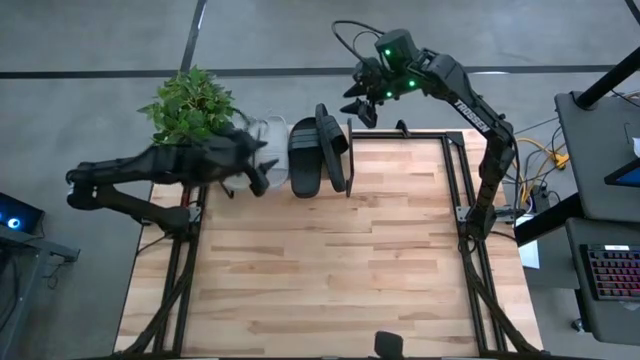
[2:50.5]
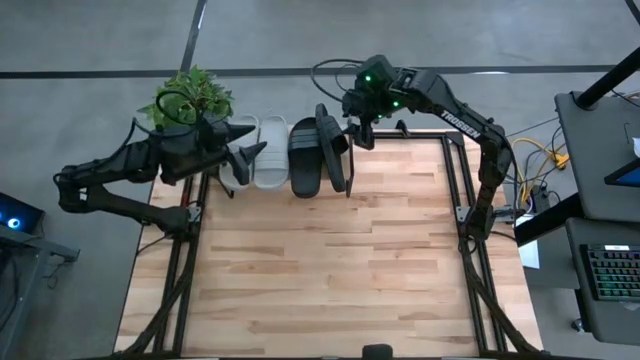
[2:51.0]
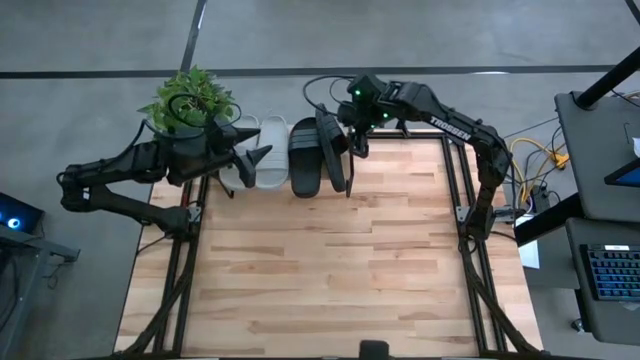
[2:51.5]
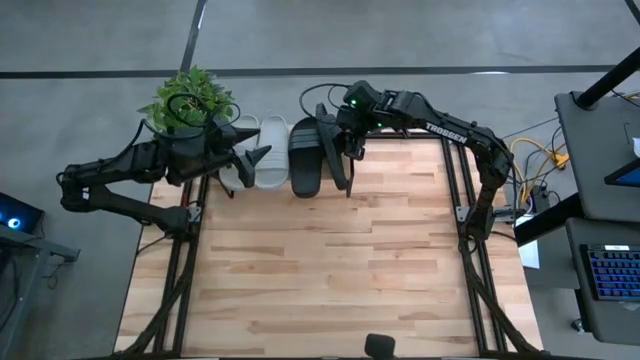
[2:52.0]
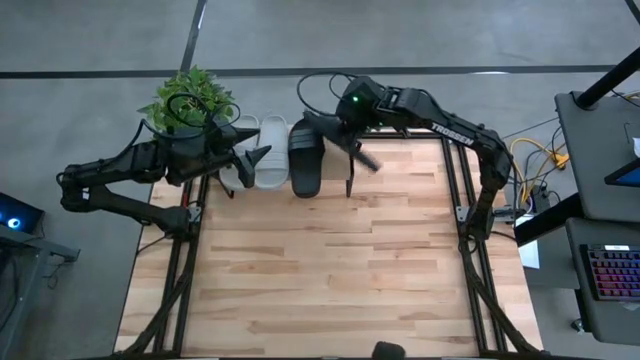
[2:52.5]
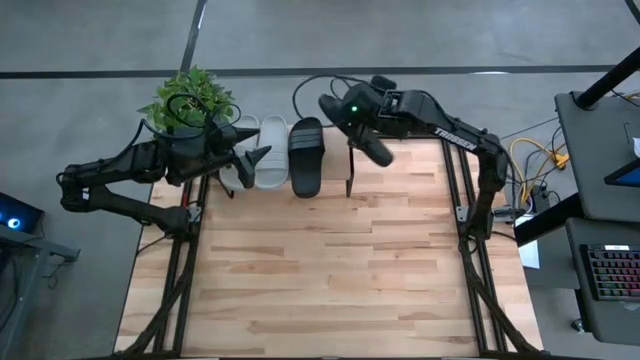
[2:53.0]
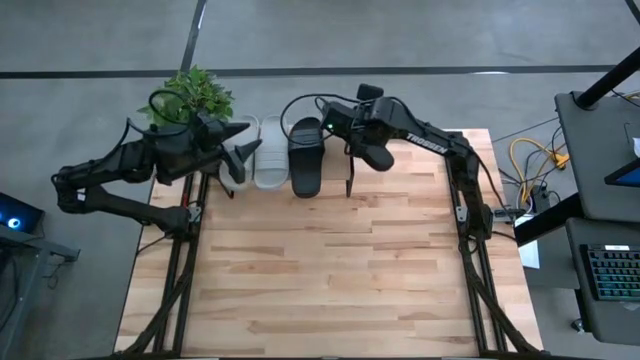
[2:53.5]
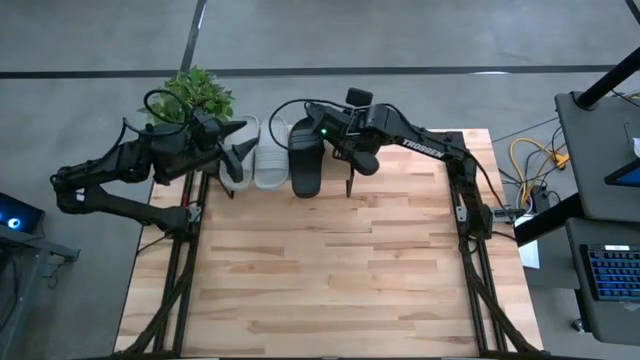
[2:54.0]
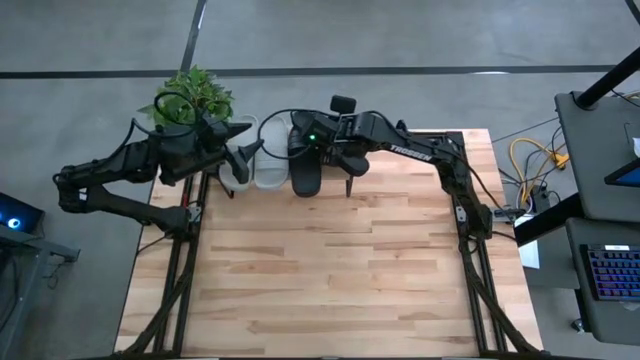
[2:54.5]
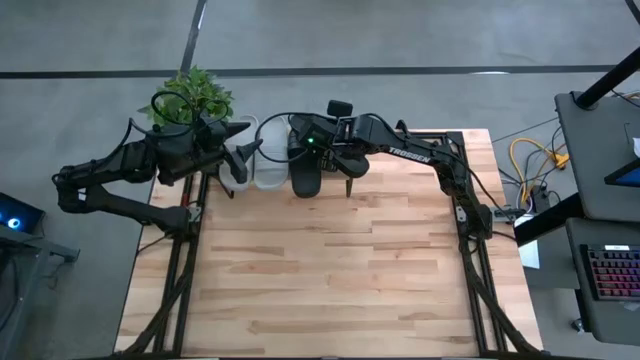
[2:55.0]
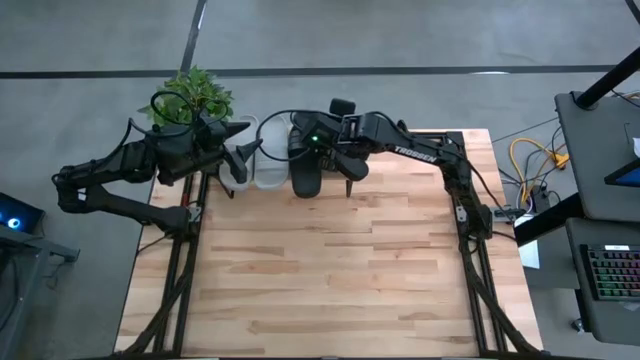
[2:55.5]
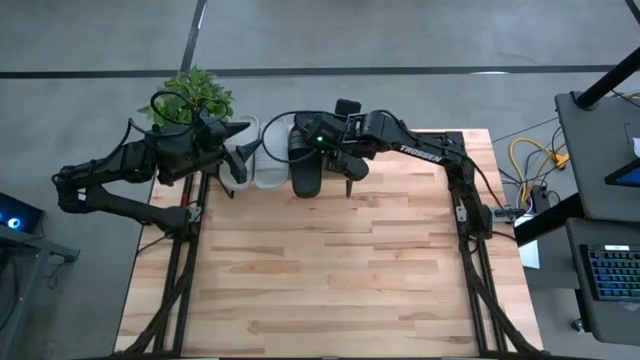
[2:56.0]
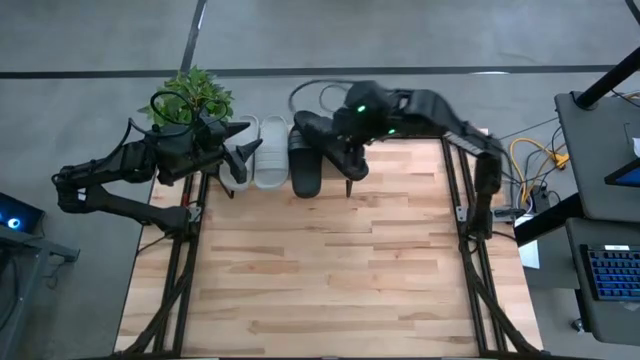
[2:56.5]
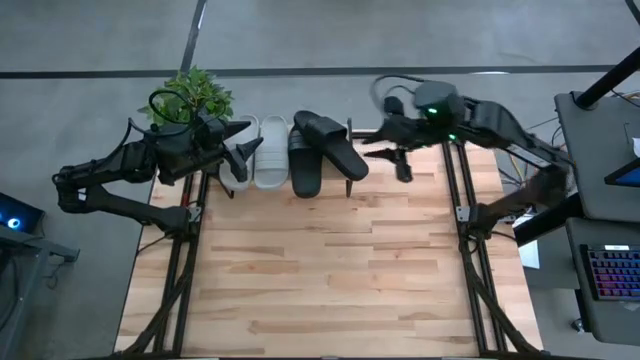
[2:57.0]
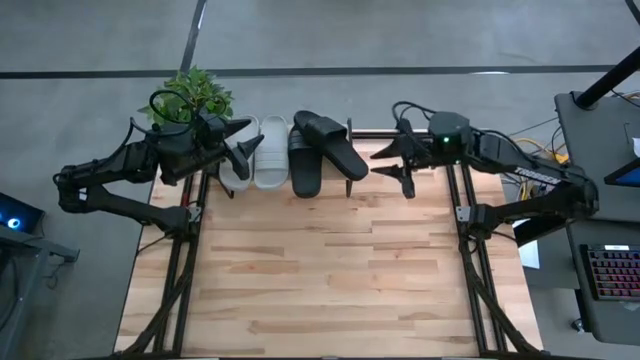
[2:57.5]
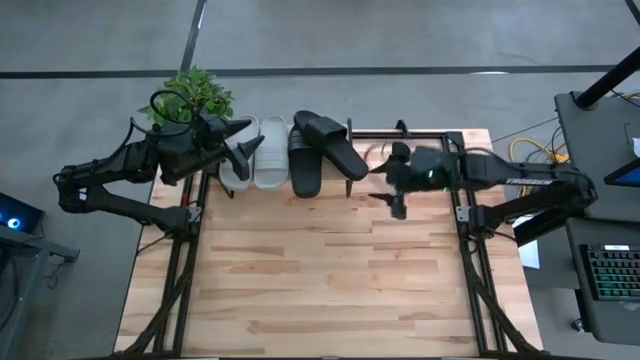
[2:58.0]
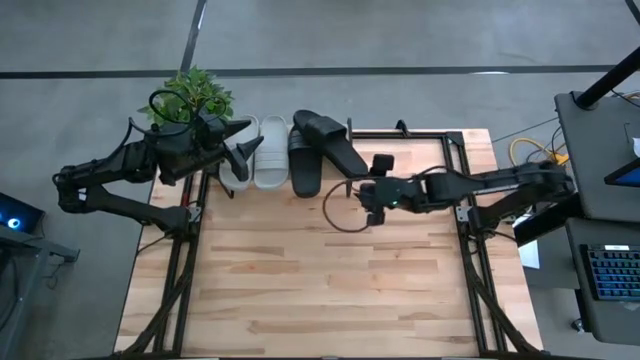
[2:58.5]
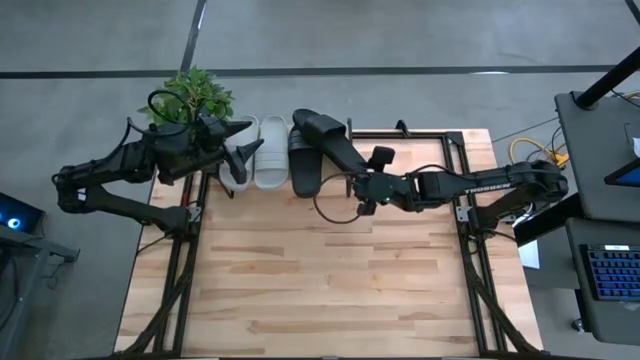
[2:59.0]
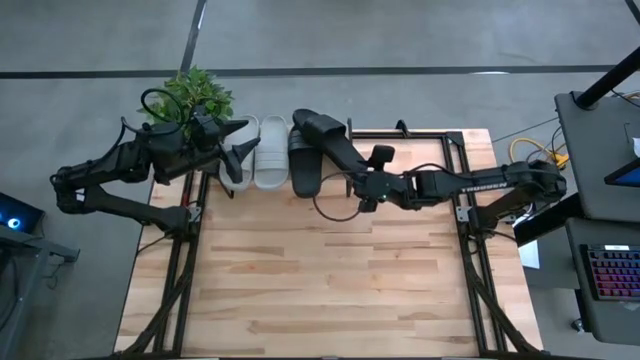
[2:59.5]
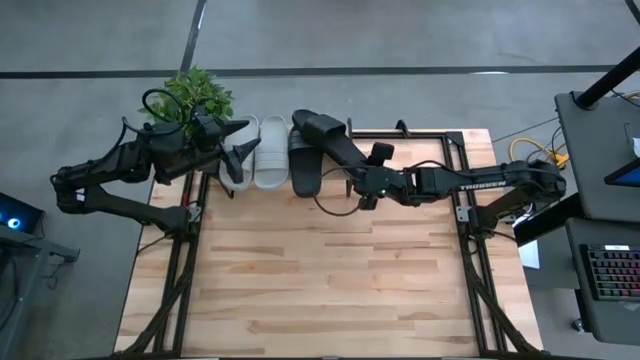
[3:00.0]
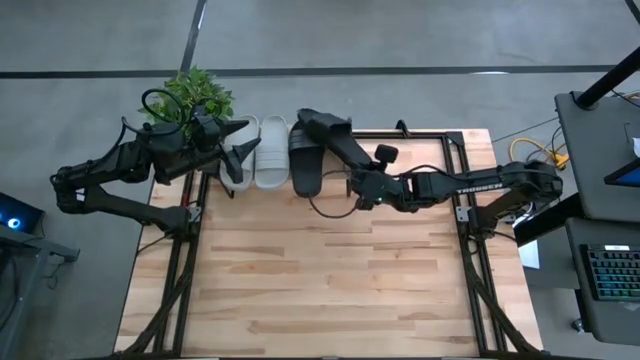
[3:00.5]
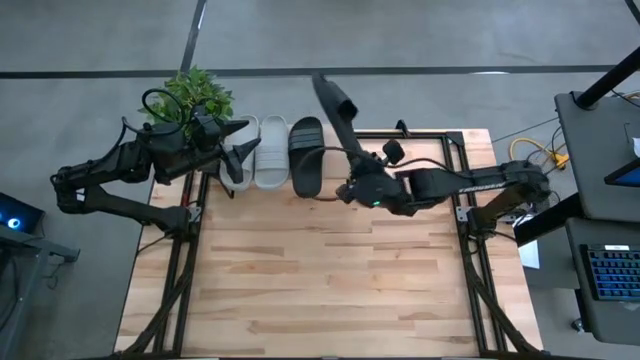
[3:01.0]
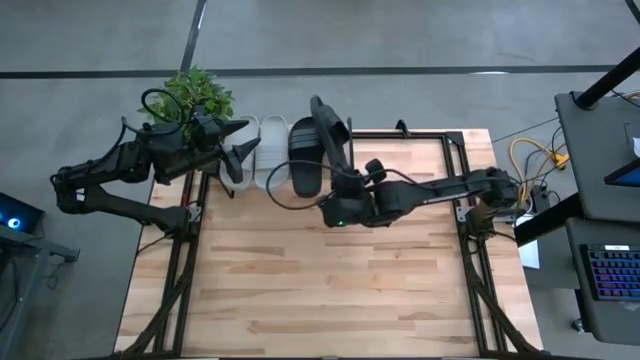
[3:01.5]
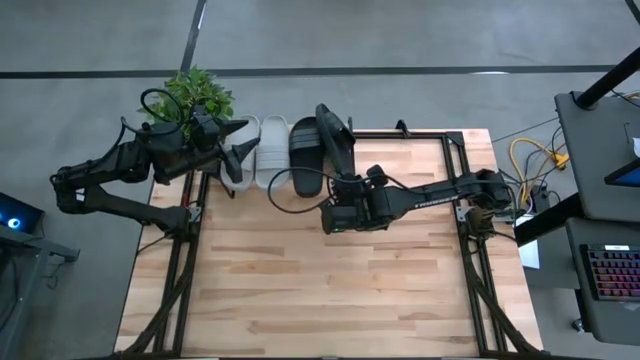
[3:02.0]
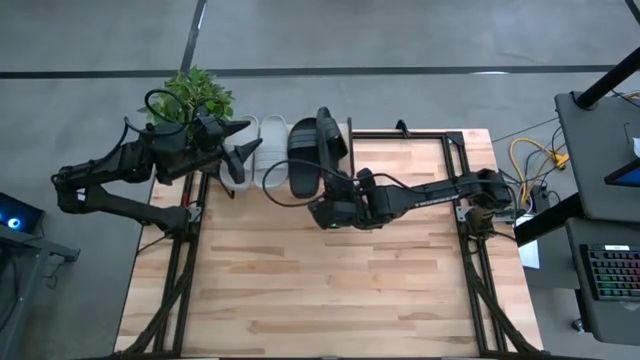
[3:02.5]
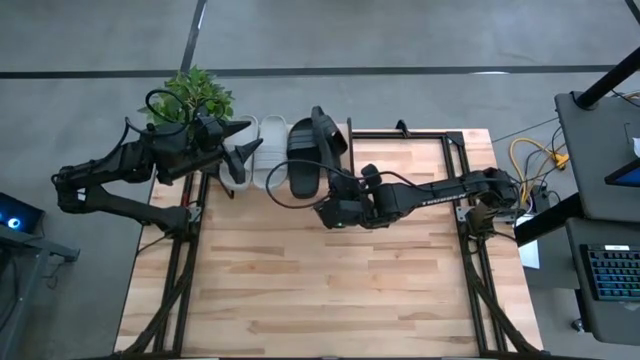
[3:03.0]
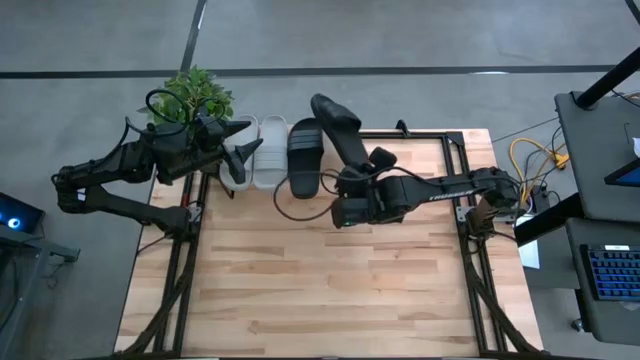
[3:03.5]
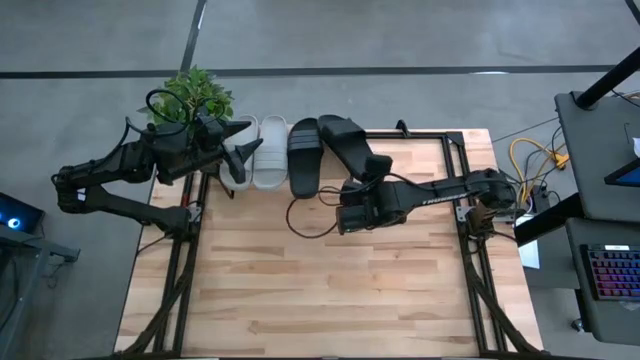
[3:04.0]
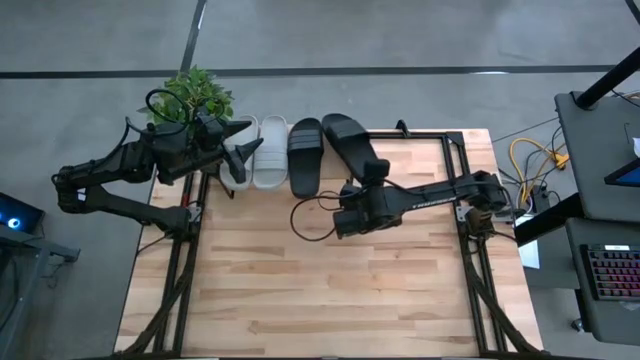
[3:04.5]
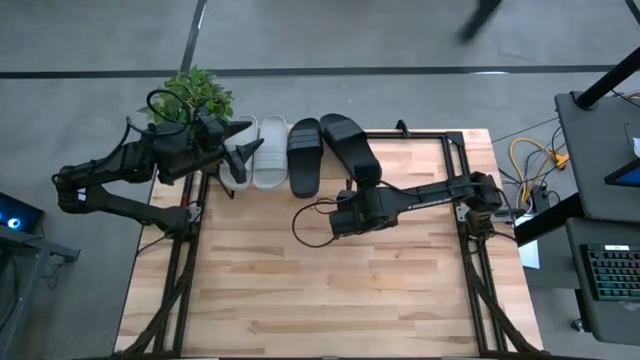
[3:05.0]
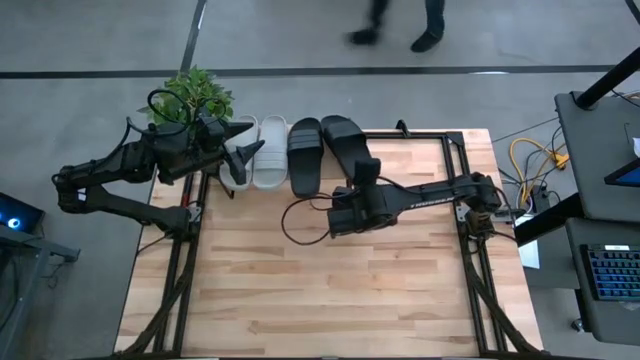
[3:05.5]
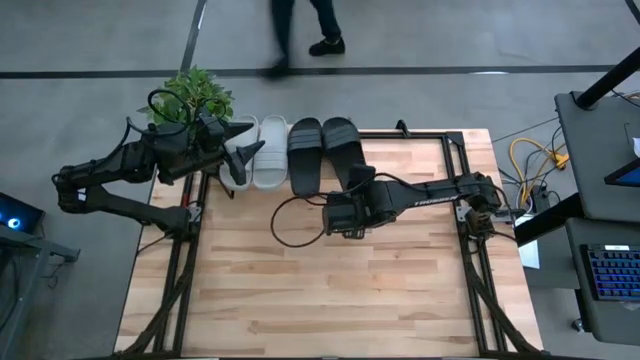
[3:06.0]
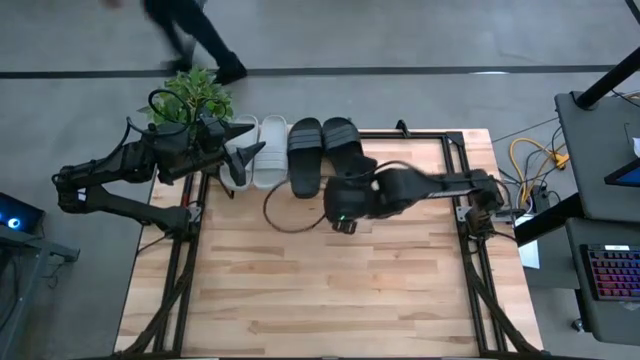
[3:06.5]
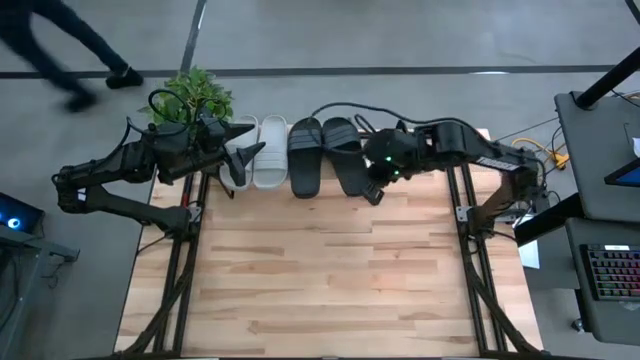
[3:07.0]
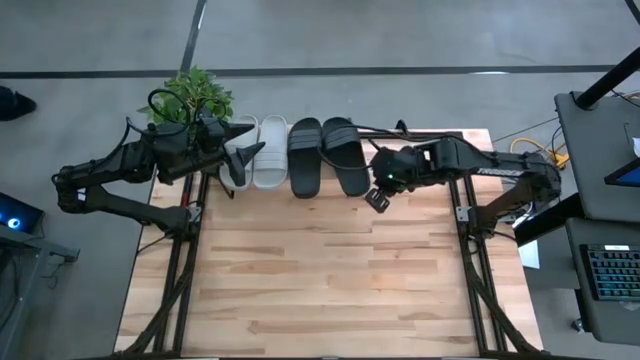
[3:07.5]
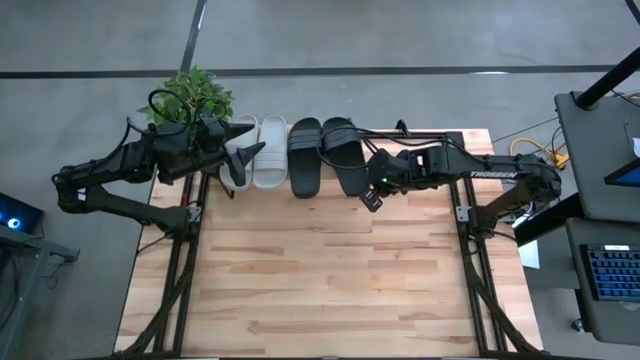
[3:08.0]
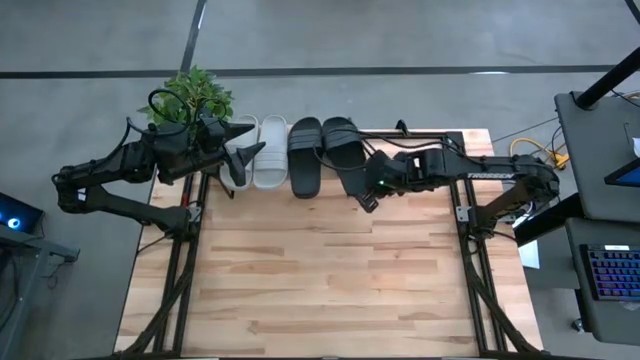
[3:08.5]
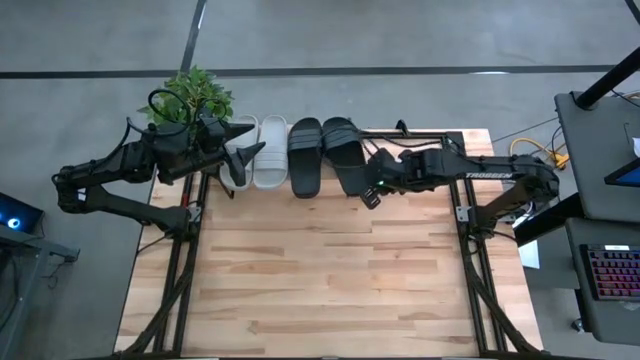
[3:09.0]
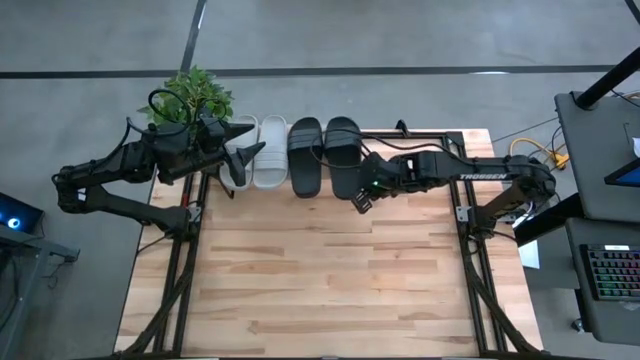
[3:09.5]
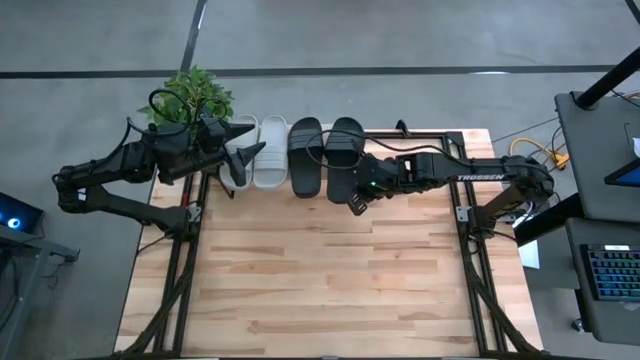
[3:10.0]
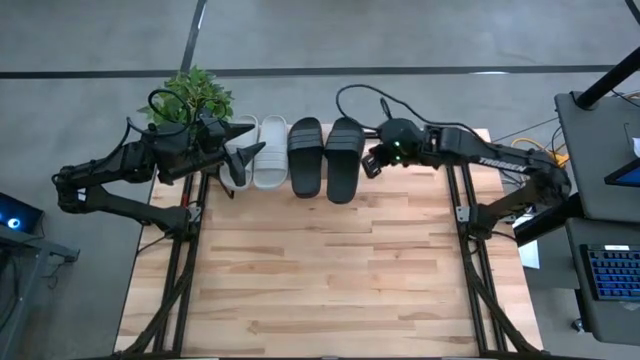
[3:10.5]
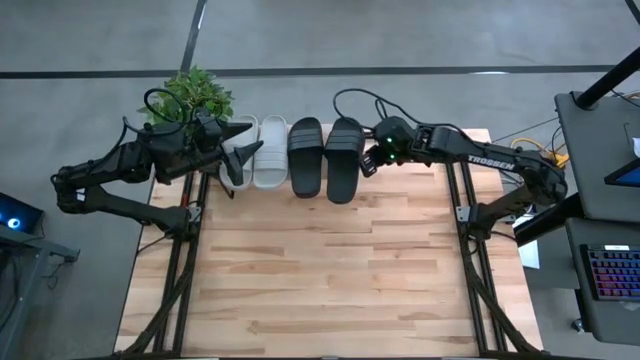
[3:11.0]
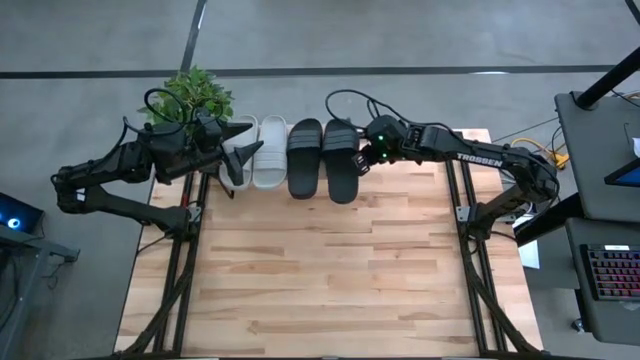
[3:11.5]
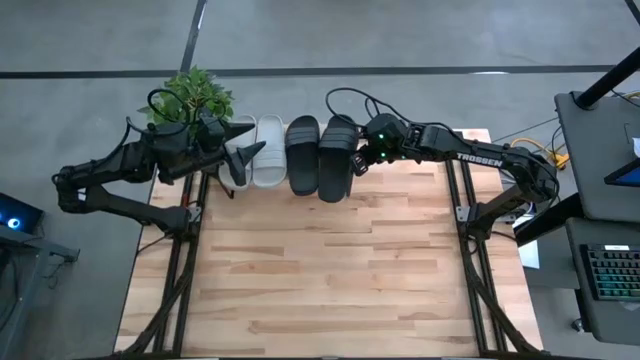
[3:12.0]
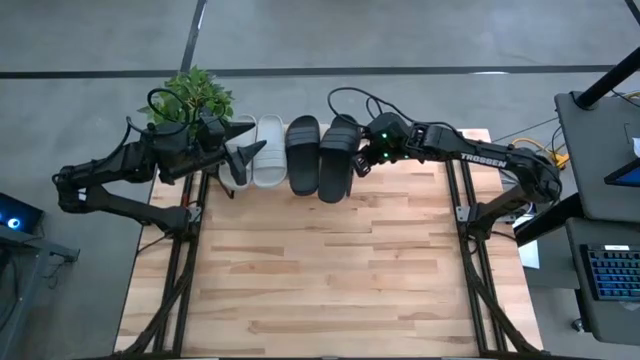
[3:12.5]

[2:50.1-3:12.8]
Task: Pick and place slides into the shelf
Adjust the right black slipper on the shelf
